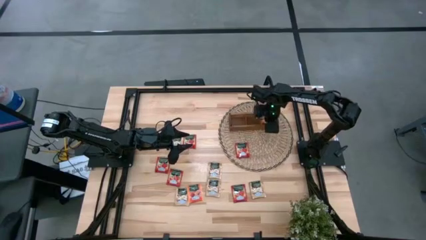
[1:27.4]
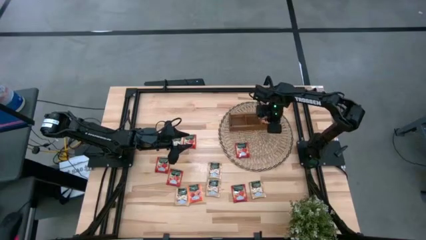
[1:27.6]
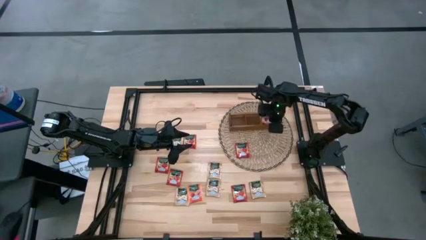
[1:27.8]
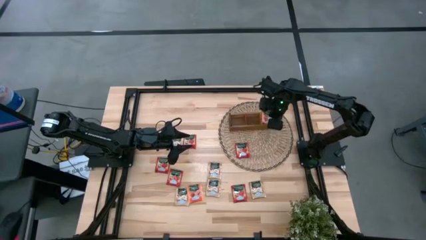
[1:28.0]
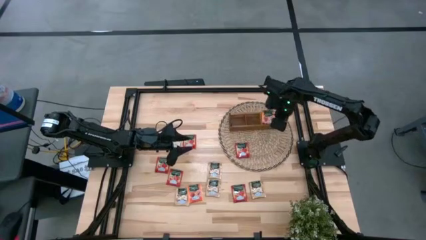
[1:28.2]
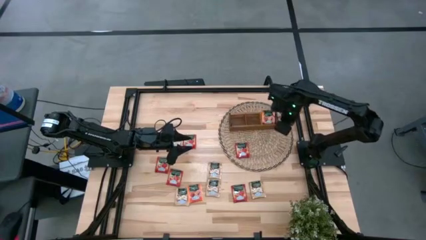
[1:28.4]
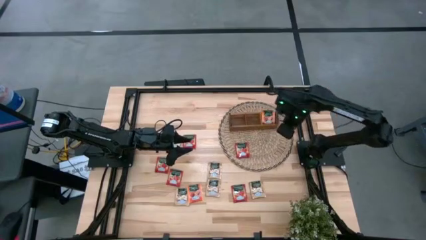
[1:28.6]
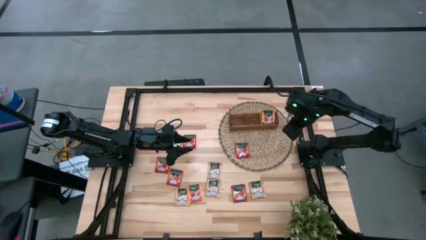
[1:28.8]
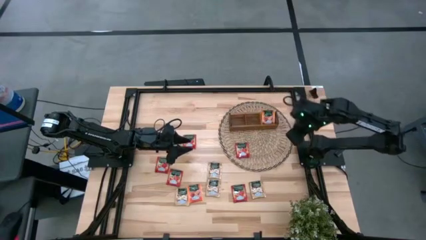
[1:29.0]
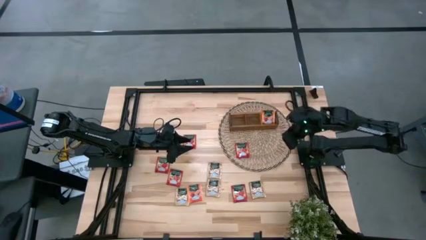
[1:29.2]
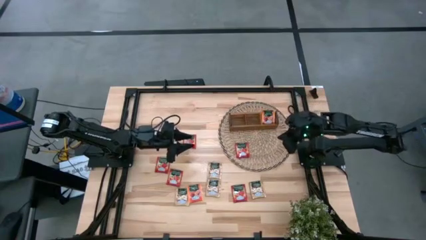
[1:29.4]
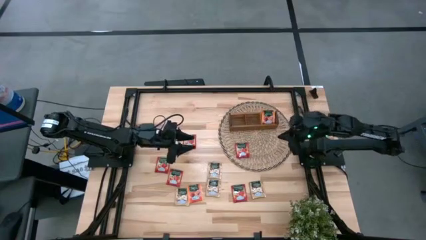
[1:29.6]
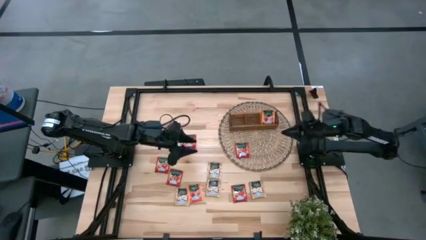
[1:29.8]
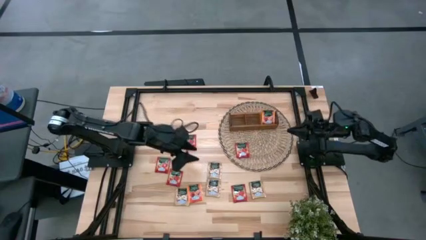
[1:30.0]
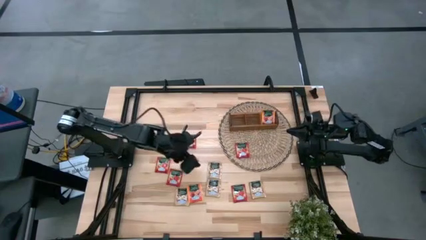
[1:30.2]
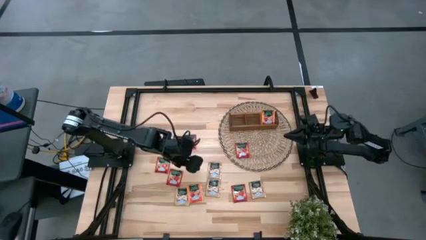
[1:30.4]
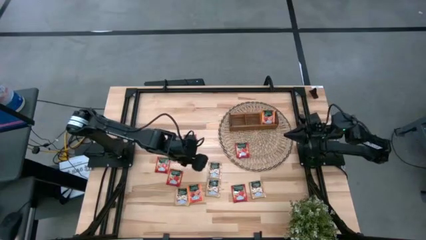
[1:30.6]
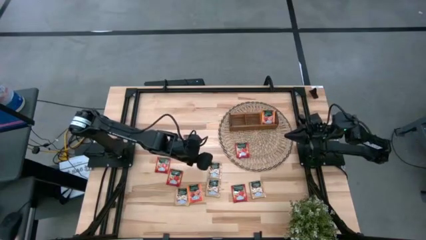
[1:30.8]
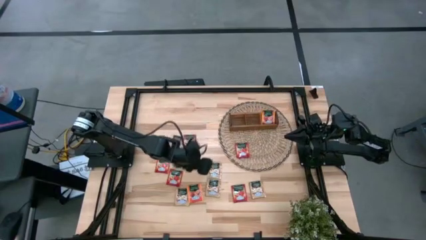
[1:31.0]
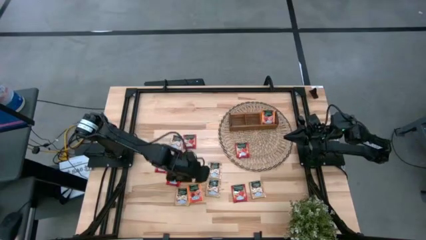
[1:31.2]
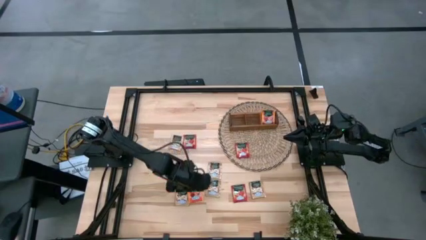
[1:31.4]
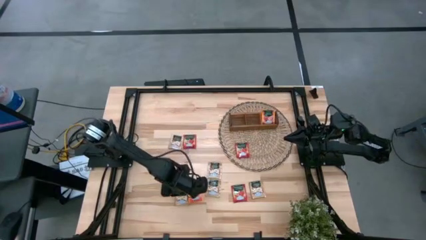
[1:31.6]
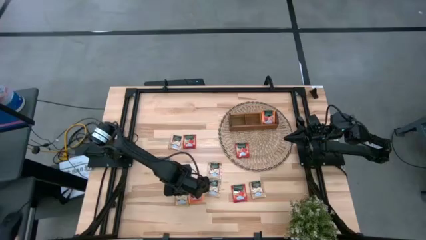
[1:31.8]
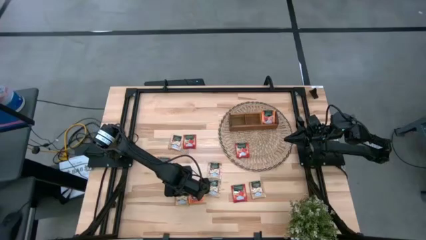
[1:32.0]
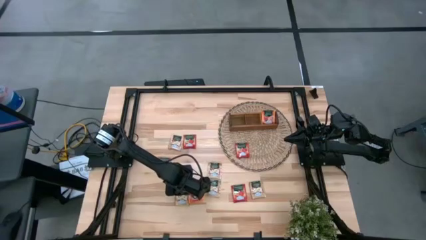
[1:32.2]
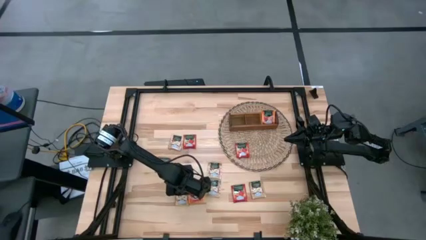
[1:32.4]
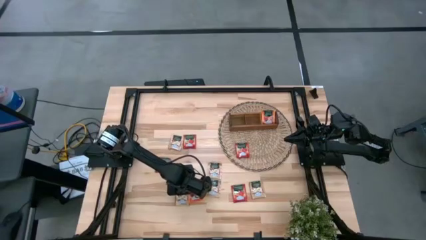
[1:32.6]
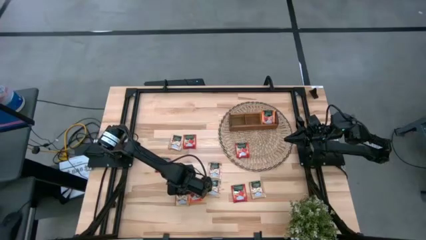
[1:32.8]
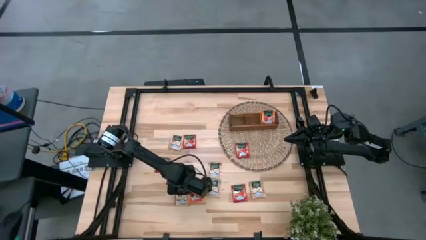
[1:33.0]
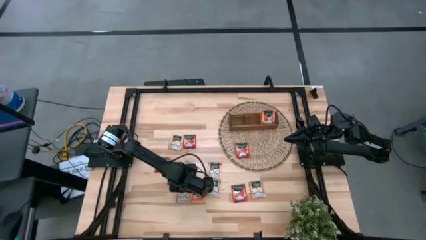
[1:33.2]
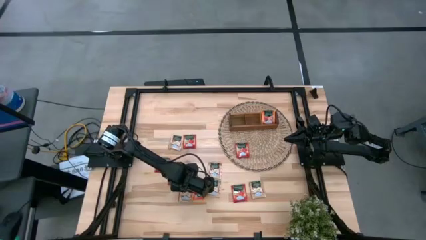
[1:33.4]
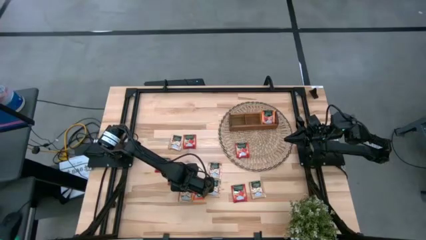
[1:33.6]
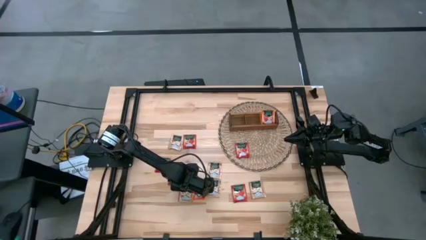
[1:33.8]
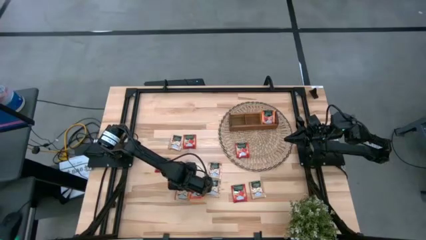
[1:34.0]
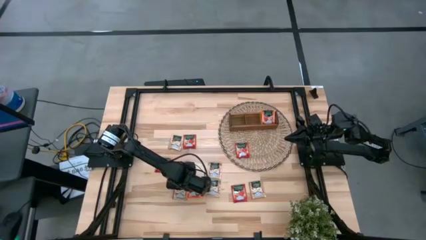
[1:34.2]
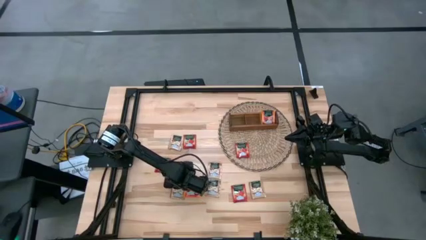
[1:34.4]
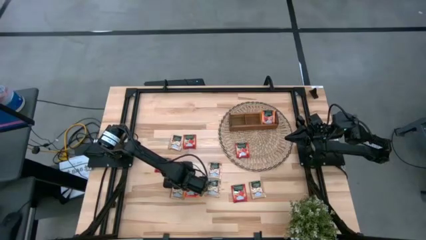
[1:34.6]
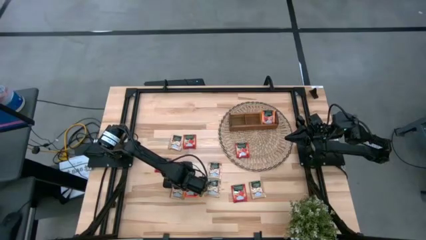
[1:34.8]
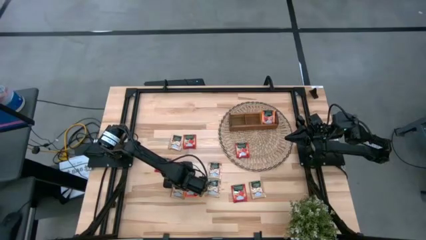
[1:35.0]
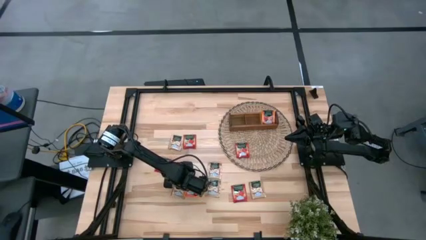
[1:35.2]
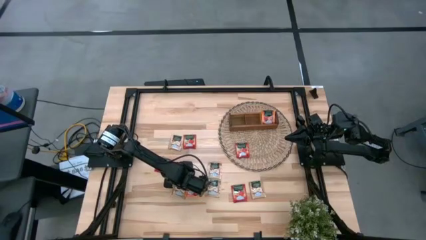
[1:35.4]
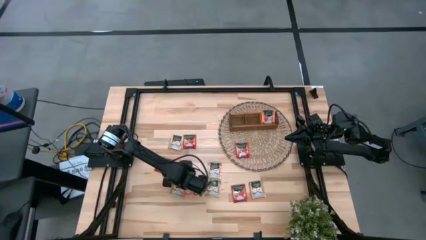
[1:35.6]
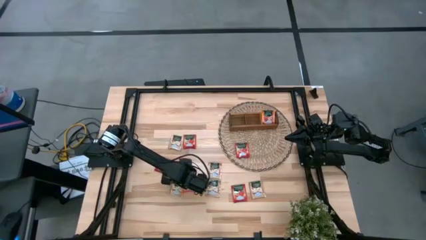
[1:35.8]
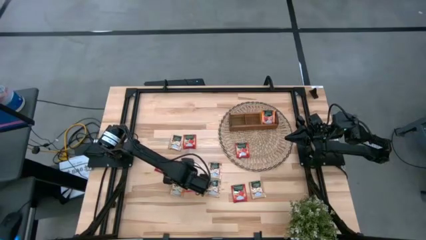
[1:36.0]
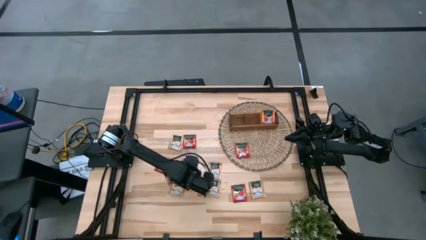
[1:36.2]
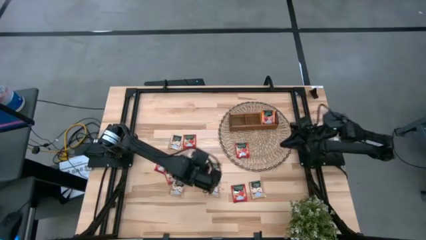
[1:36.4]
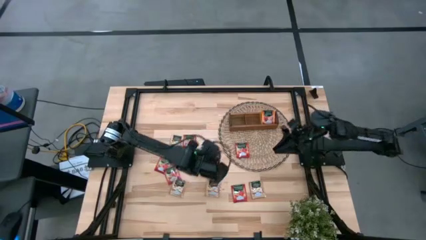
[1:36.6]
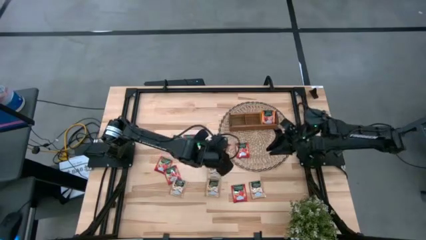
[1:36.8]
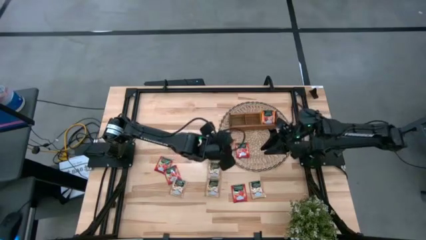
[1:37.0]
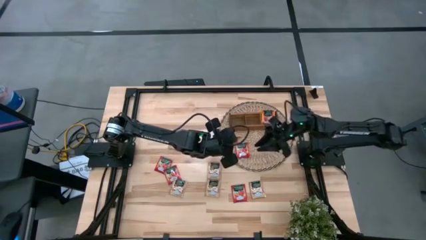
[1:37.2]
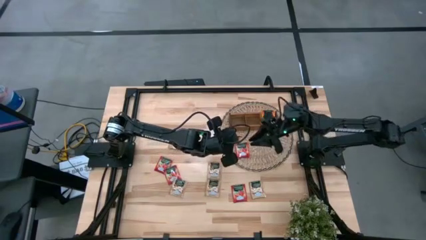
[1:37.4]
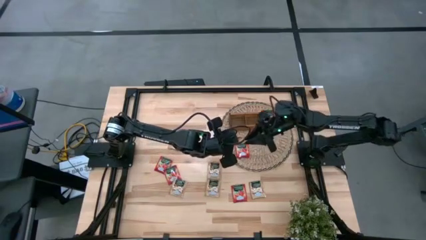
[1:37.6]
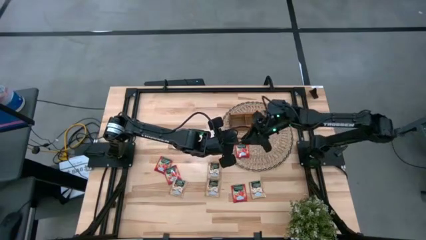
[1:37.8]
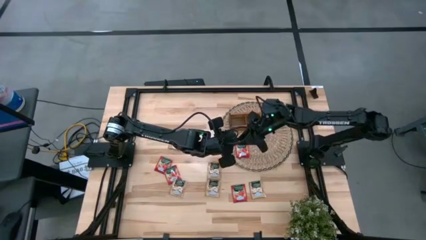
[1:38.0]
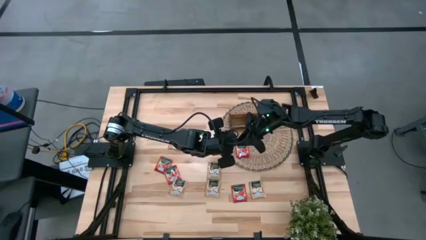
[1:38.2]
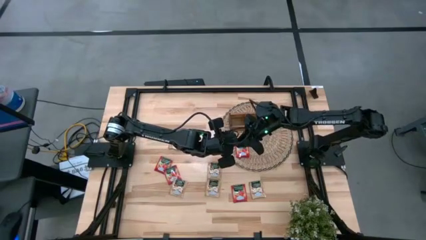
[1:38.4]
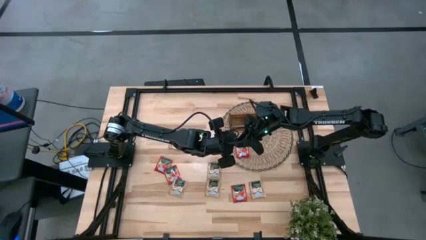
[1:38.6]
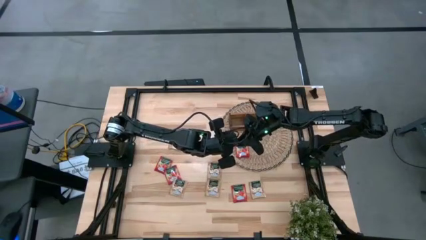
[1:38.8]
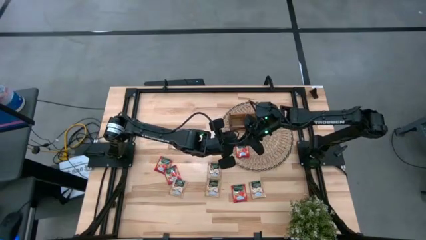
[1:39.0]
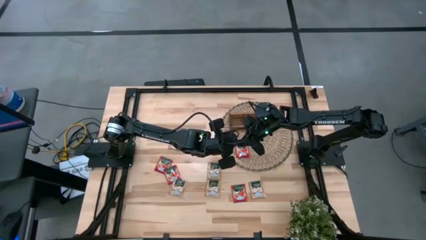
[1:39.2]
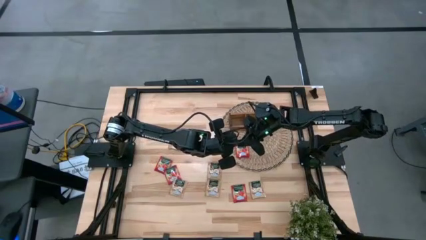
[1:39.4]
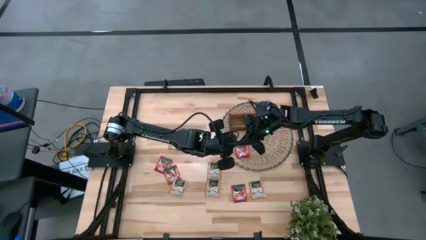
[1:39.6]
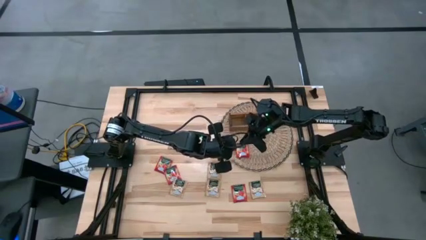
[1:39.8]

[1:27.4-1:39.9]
Task: Pick & Place Tea
Put the orange tea pack into the right compartment of the brown organizer
